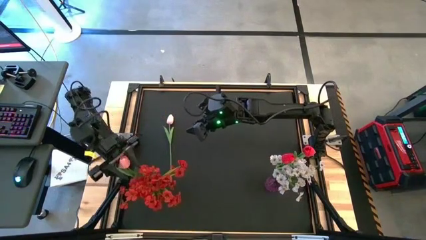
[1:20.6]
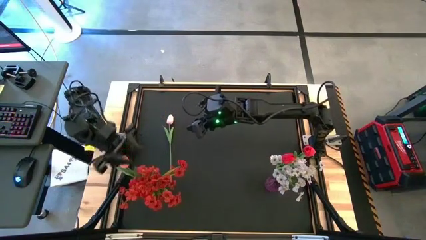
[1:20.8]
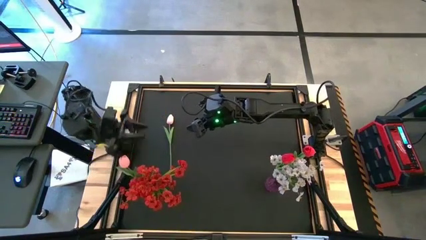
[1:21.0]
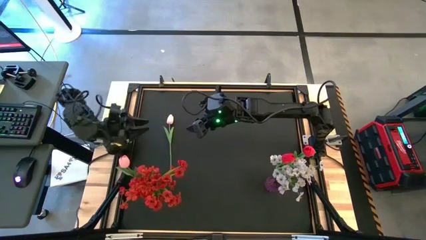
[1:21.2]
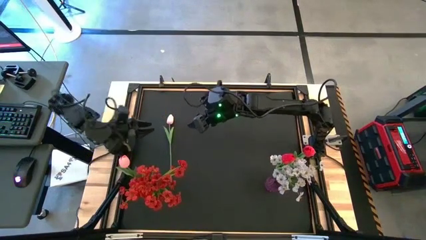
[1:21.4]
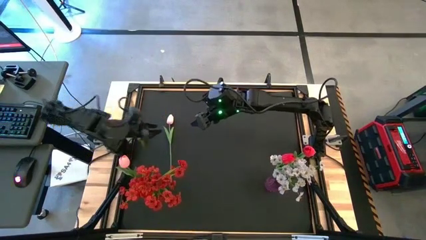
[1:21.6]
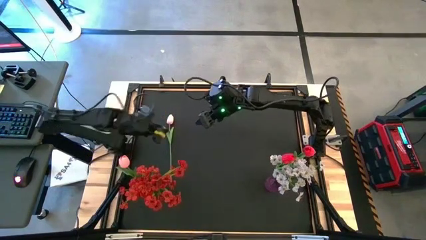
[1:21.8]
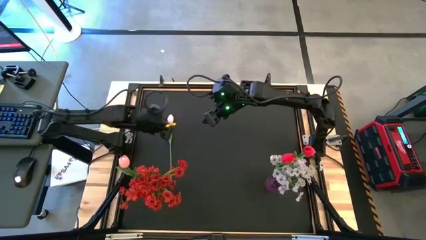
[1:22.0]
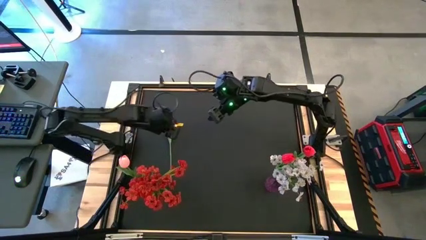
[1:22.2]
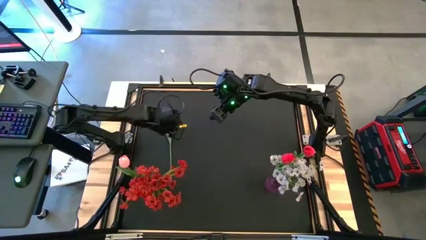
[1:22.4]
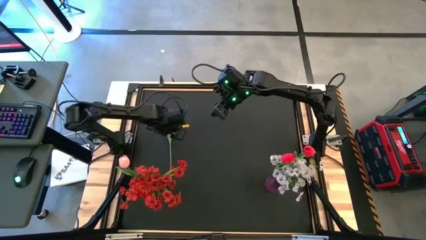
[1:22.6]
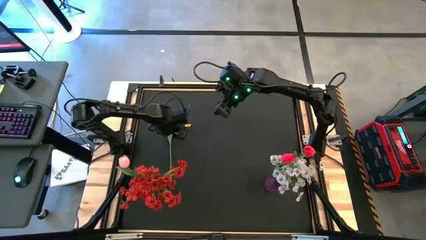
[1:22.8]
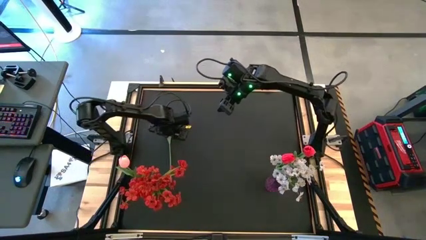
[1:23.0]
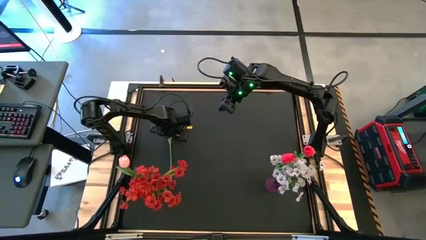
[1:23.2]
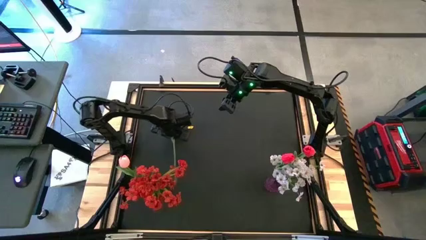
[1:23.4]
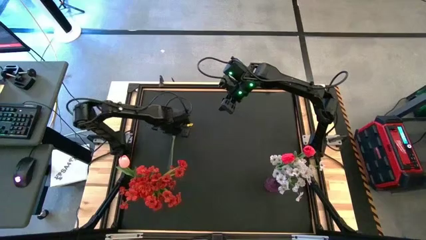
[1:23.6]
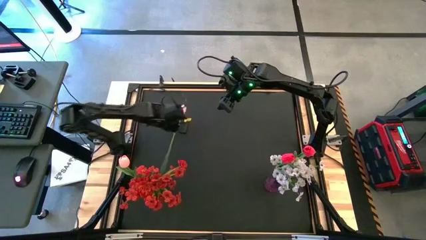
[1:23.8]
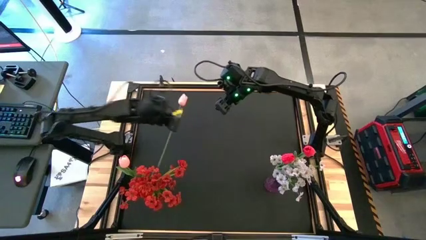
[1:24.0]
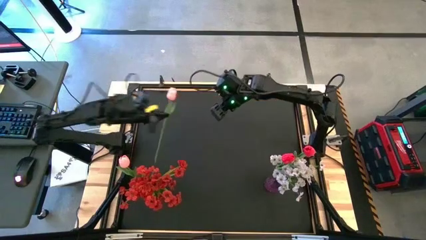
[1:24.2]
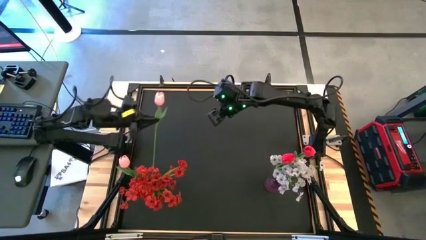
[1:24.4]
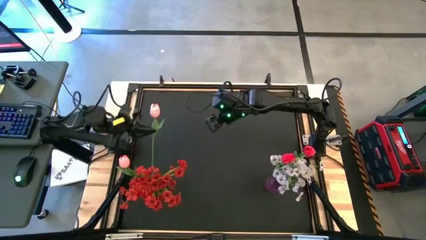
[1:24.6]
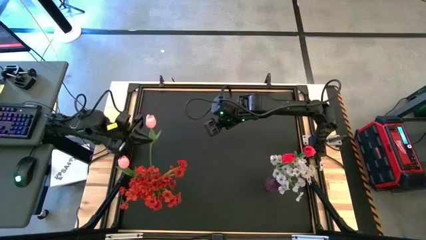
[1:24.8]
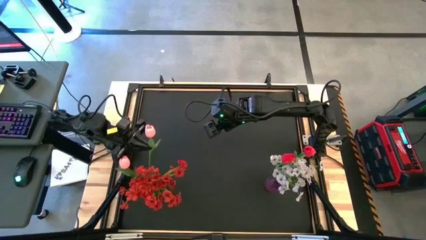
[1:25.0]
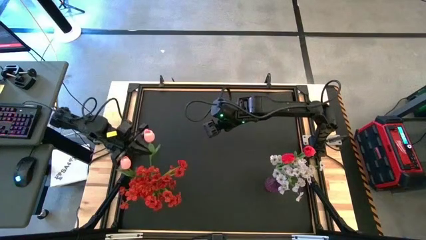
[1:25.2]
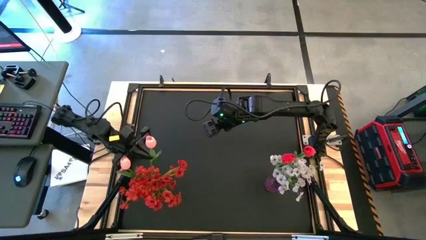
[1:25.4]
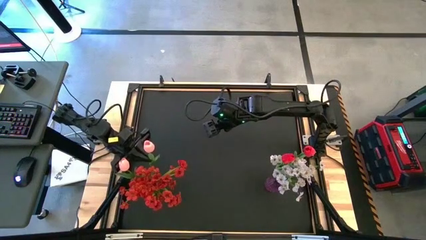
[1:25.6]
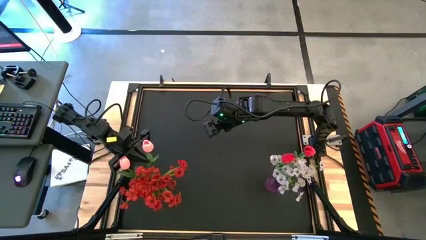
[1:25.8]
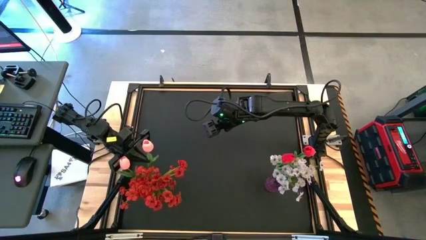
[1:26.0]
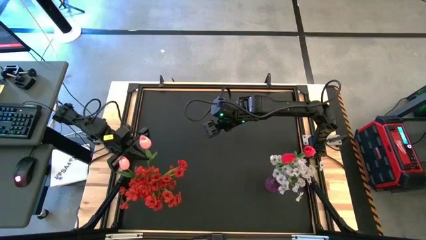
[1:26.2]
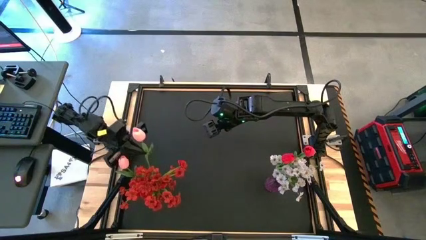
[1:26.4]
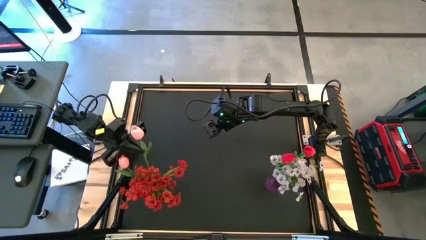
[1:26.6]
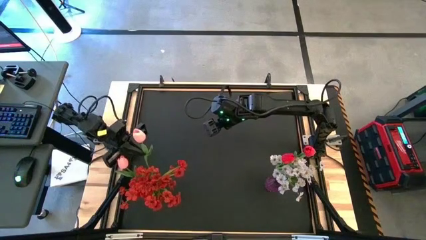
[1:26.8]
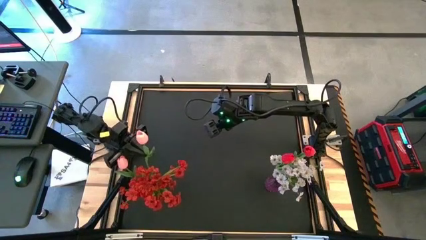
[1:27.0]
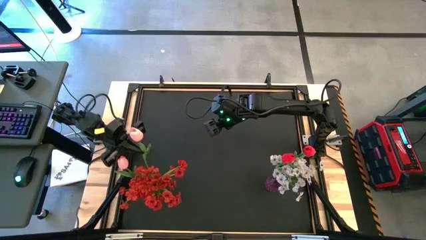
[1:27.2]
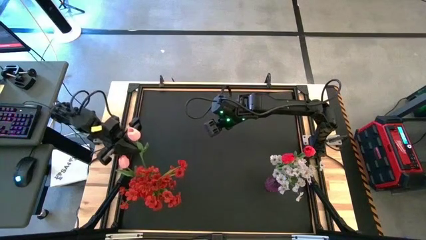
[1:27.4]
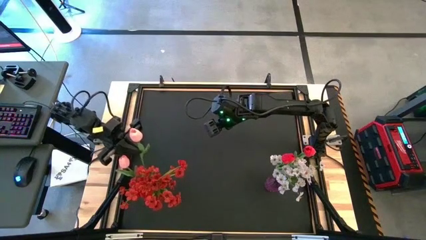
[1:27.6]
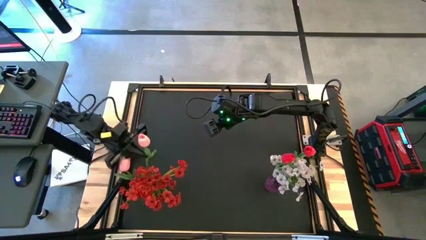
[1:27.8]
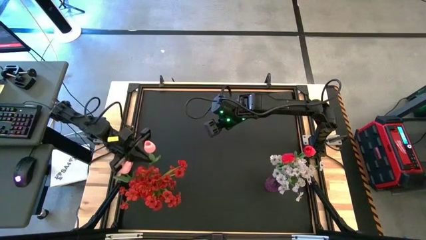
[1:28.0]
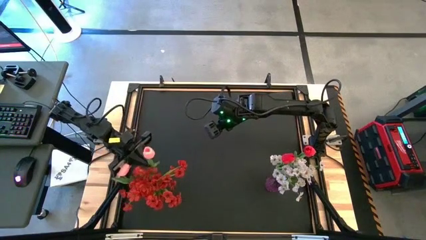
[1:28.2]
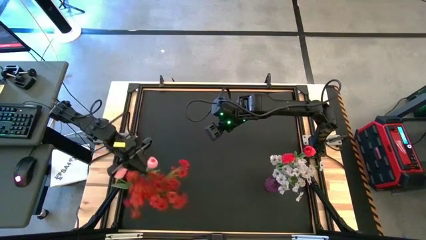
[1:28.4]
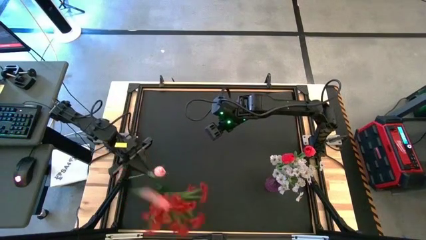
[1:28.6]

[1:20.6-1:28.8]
Task: Sort flowers into vase by color
Put the pink flower into the green vase

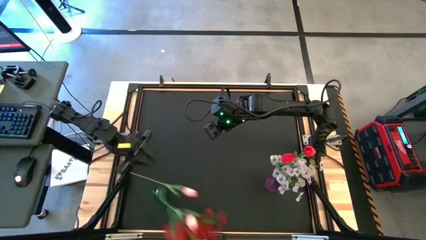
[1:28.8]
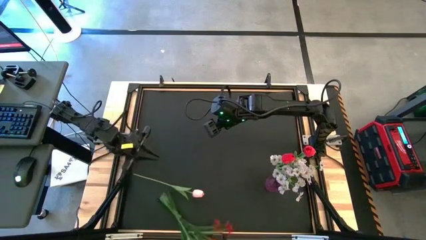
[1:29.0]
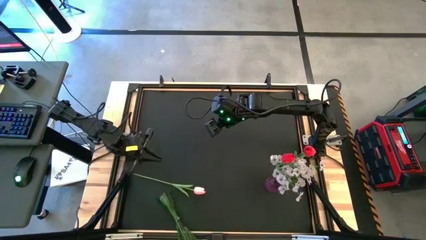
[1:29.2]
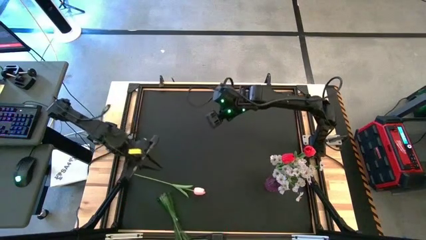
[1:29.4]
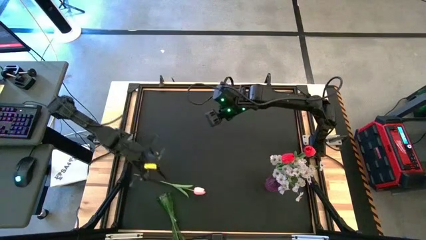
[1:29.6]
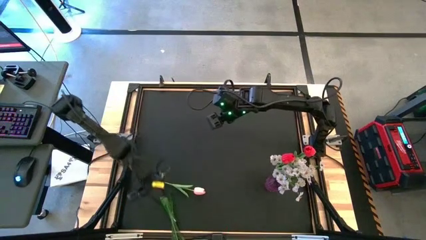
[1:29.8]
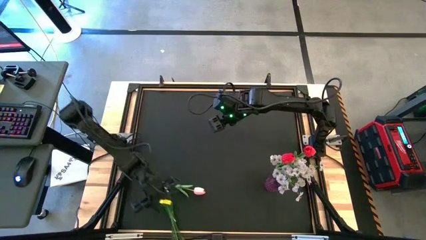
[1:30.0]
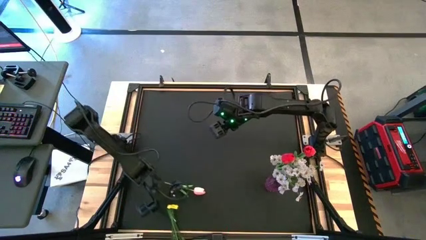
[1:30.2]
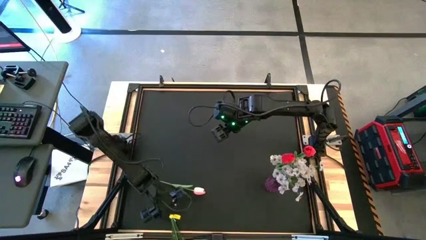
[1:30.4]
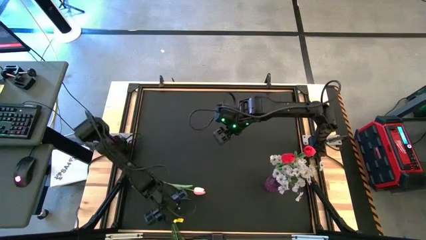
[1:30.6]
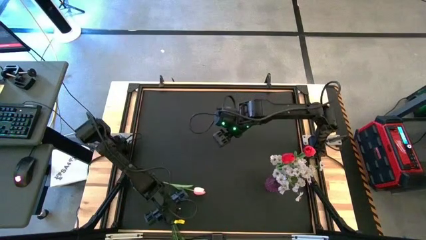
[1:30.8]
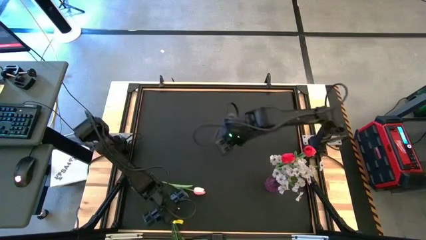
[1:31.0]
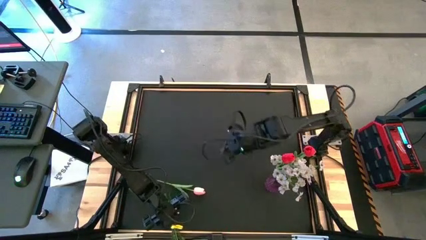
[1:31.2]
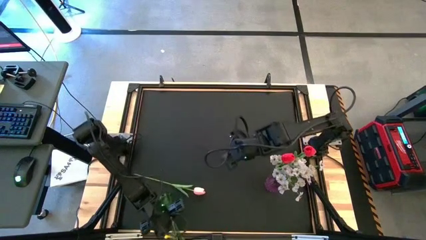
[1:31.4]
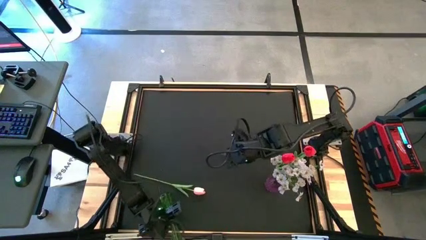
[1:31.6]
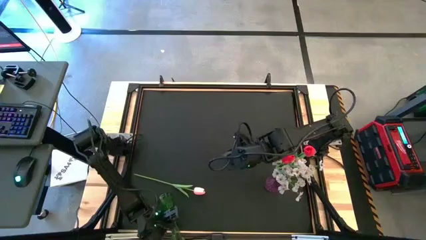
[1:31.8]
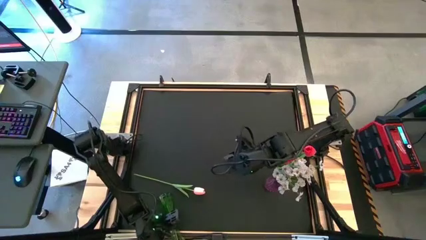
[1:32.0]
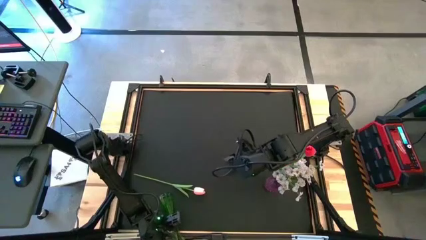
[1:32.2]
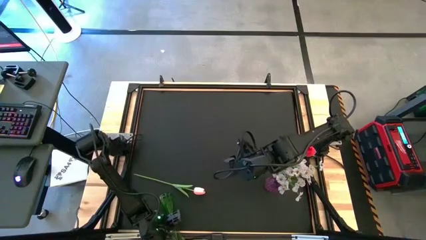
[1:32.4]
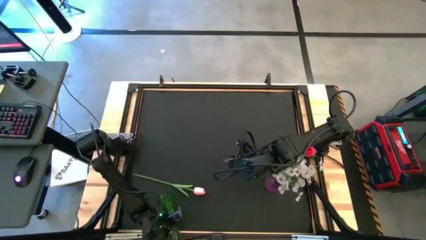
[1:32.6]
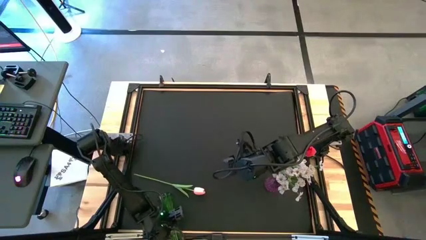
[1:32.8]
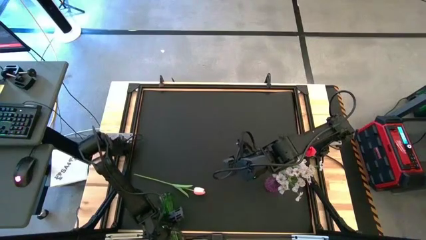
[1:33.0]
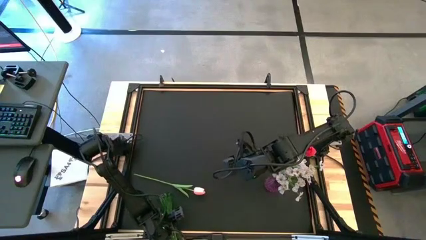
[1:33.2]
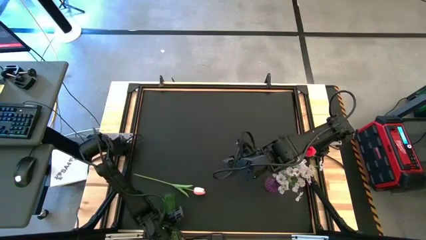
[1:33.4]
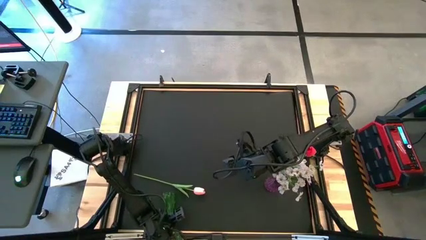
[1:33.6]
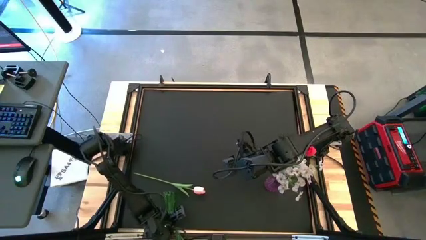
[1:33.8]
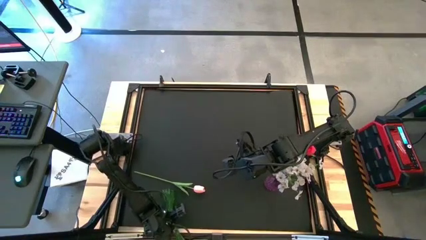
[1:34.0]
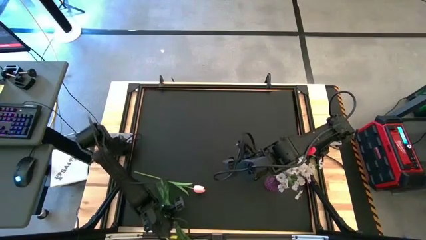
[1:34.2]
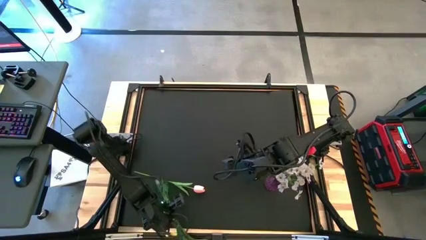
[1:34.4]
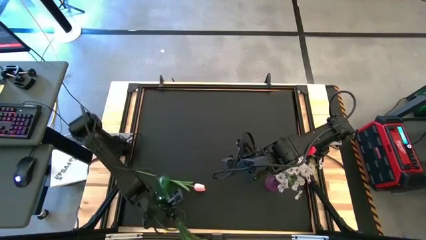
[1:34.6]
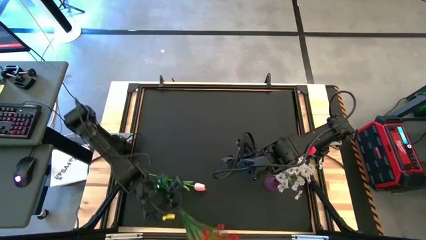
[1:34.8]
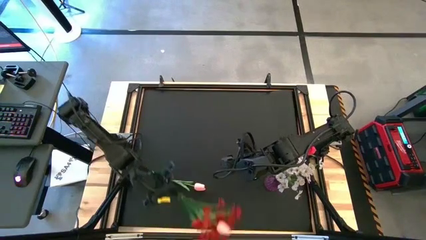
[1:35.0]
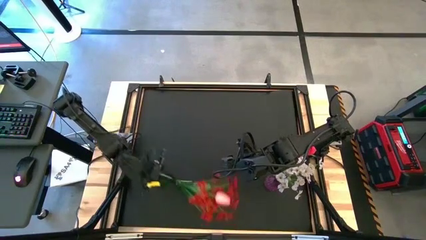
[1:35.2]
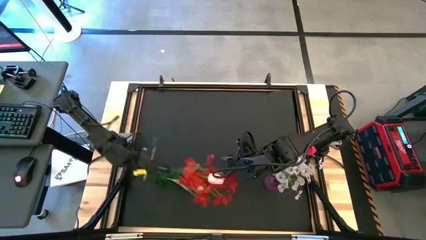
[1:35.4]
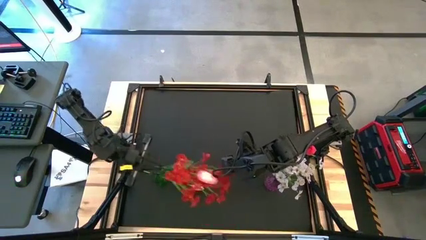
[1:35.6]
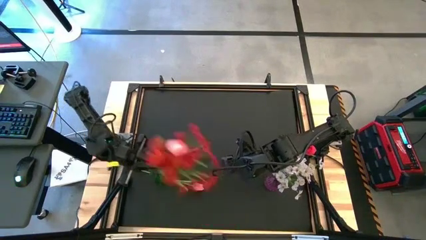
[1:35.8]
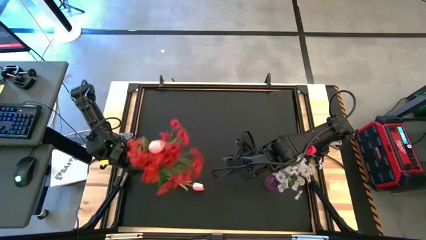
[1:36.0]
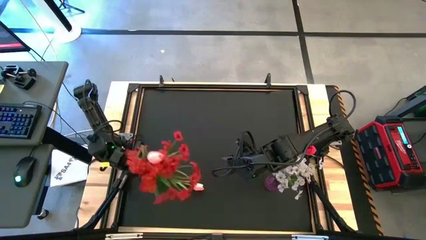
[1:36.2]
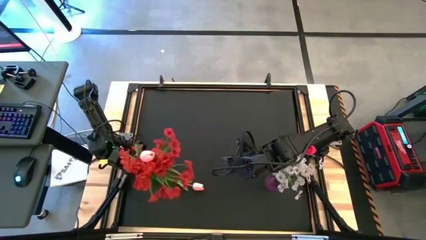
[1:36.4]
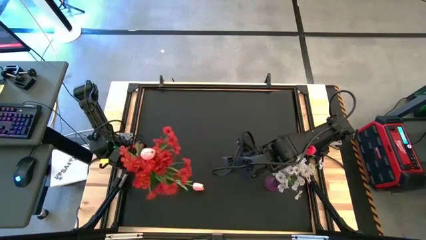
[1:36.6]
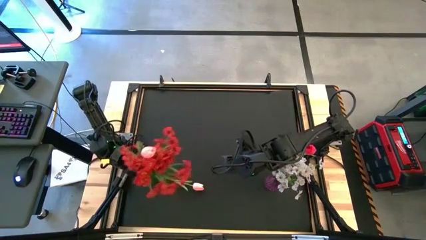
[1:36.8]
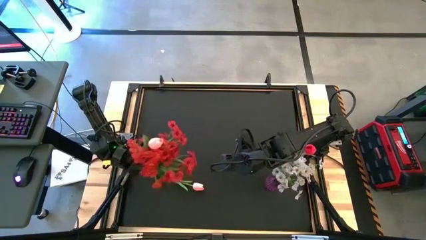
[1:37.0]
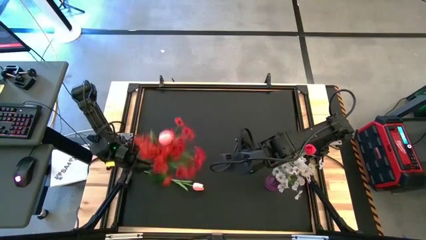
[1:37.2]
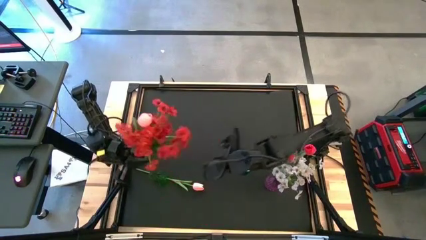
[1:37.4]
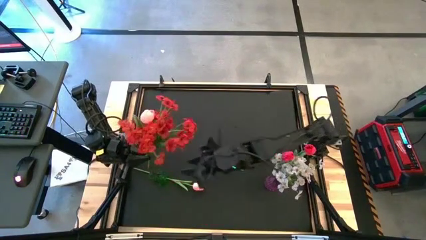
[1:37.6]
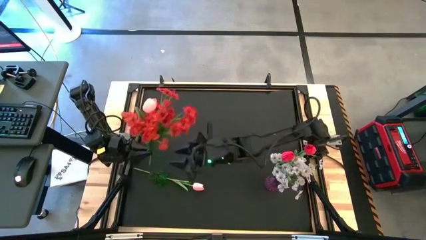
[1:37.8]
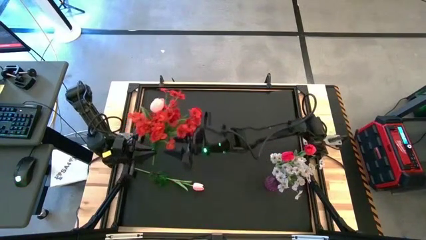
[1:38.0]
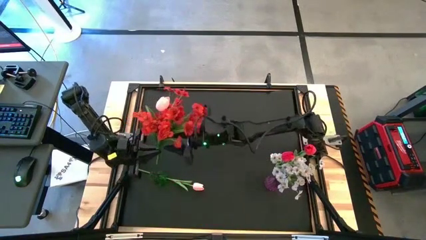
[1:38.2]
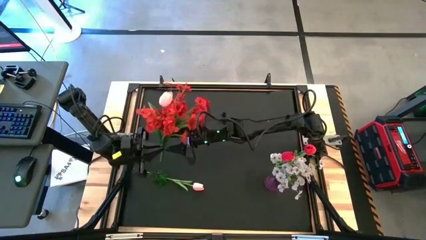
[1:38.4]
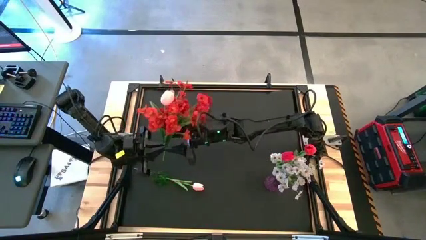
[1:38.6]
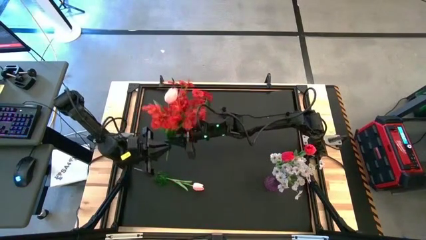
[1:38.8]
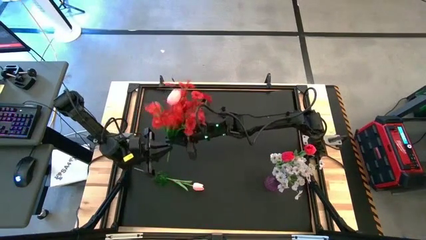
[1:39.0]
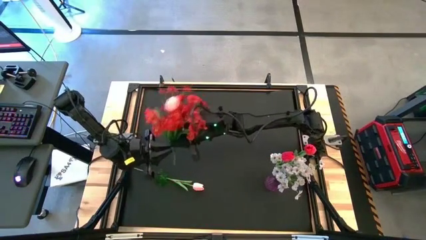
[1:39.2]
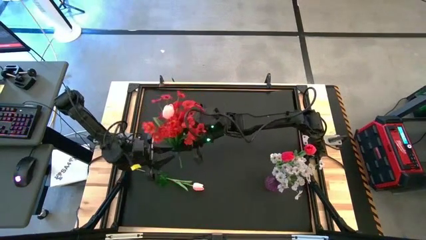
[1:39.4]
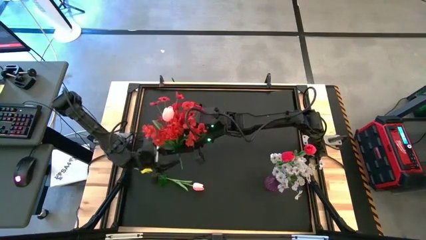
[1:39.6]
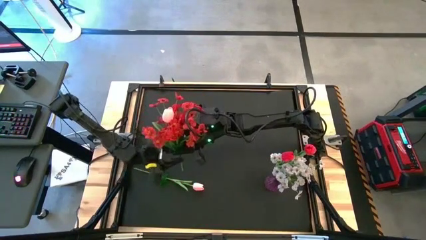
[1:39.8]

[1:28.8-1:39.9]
Adjust the green vase
